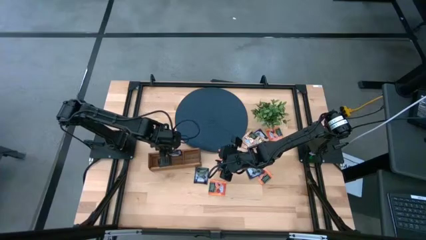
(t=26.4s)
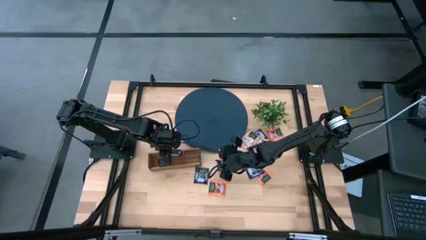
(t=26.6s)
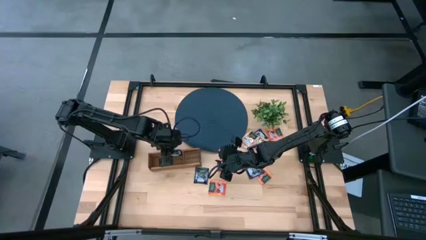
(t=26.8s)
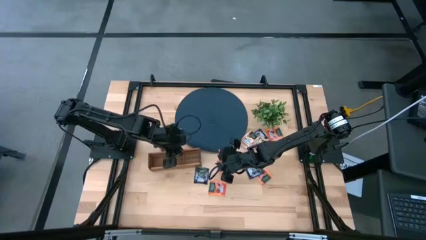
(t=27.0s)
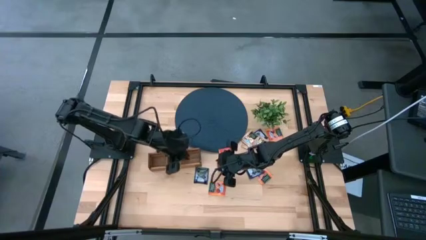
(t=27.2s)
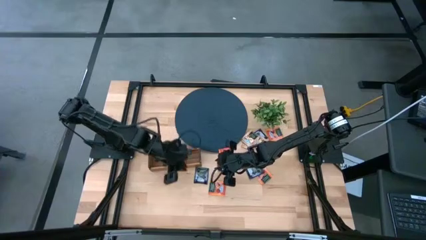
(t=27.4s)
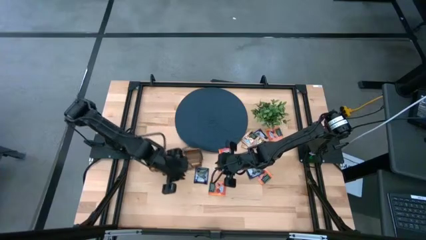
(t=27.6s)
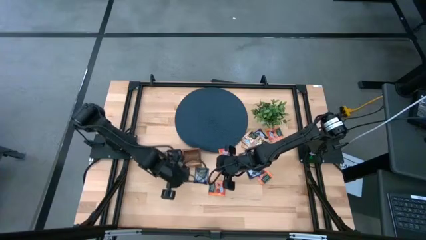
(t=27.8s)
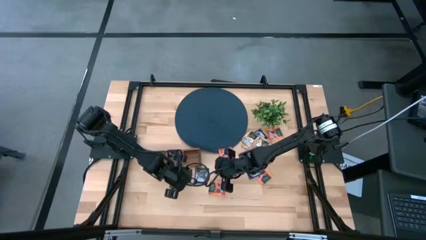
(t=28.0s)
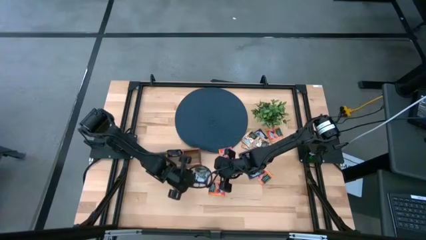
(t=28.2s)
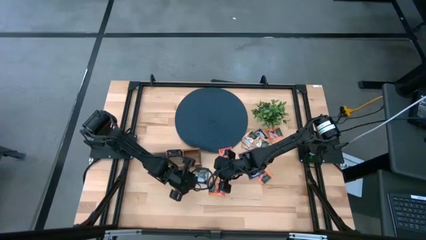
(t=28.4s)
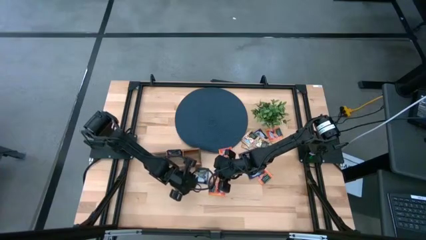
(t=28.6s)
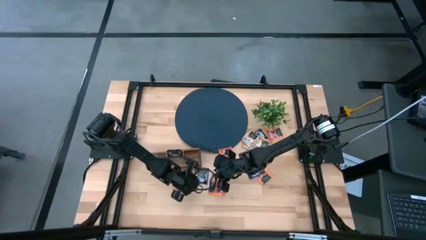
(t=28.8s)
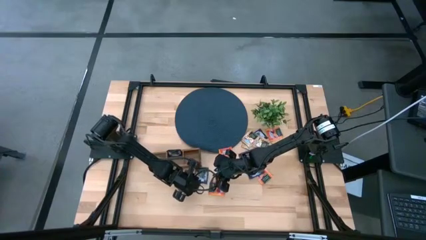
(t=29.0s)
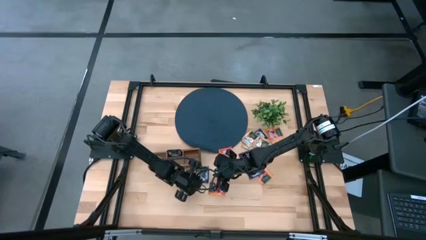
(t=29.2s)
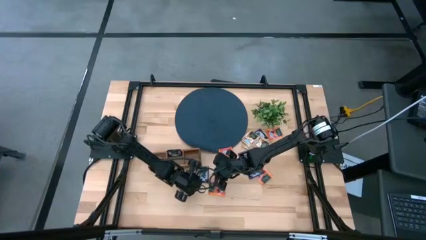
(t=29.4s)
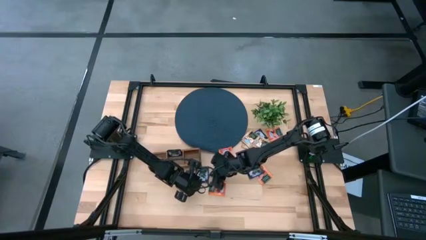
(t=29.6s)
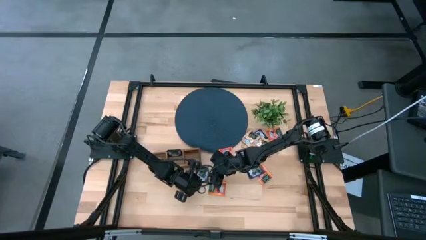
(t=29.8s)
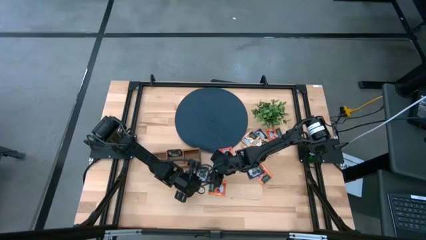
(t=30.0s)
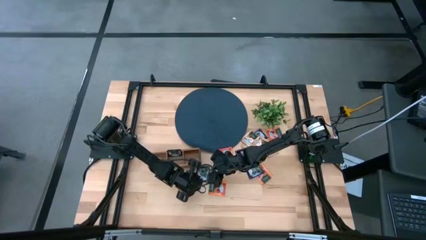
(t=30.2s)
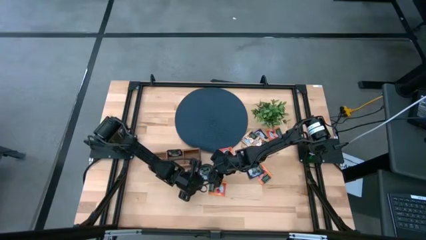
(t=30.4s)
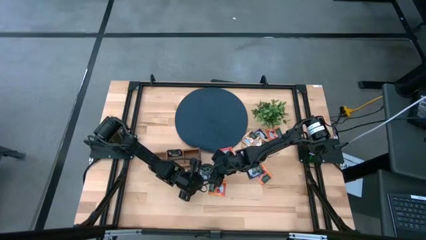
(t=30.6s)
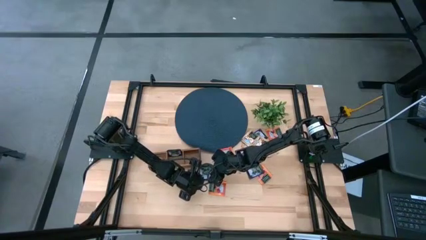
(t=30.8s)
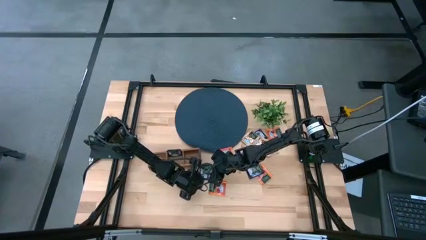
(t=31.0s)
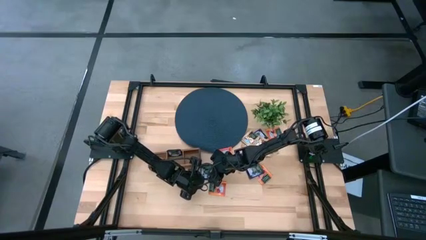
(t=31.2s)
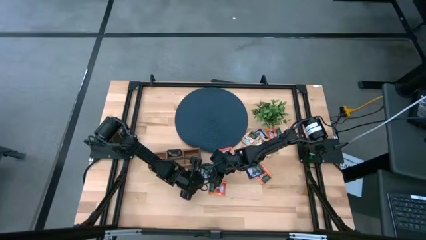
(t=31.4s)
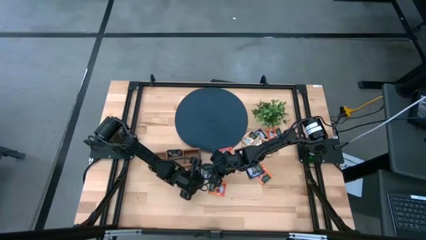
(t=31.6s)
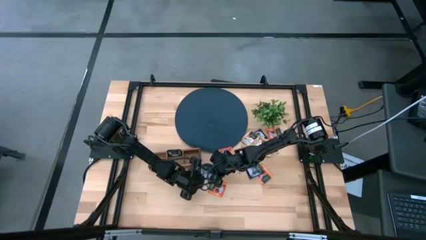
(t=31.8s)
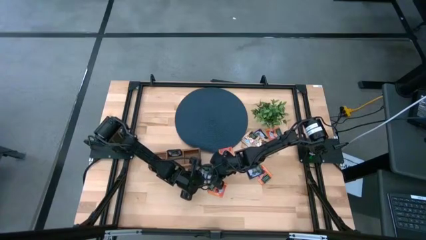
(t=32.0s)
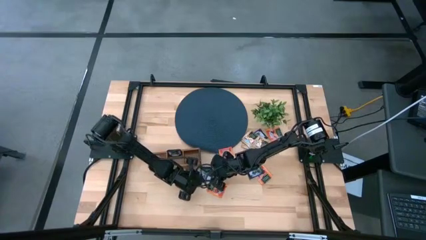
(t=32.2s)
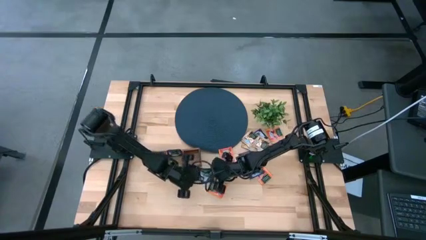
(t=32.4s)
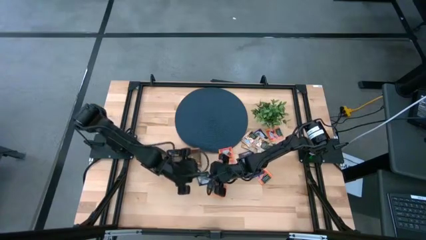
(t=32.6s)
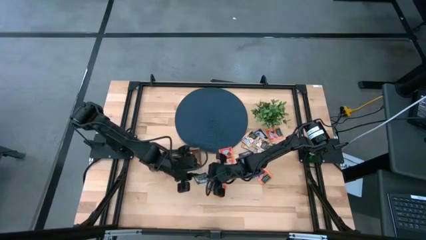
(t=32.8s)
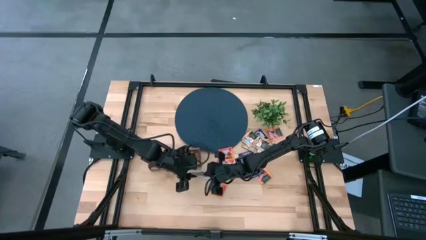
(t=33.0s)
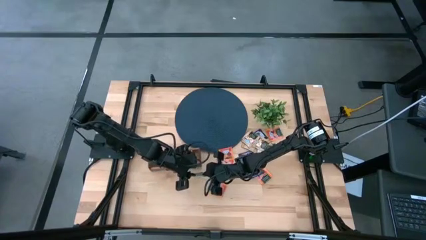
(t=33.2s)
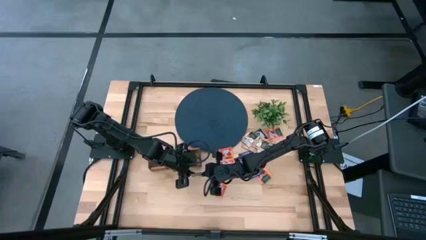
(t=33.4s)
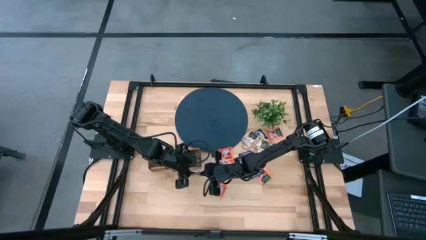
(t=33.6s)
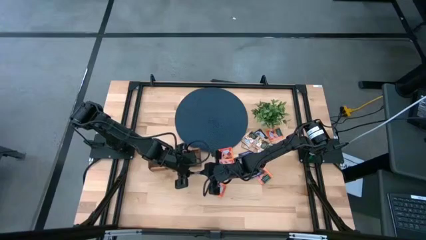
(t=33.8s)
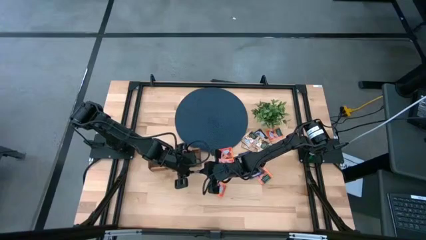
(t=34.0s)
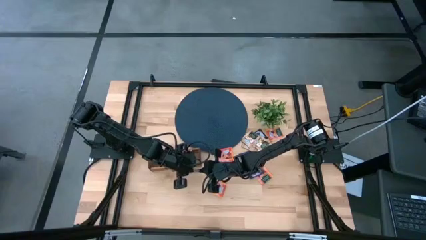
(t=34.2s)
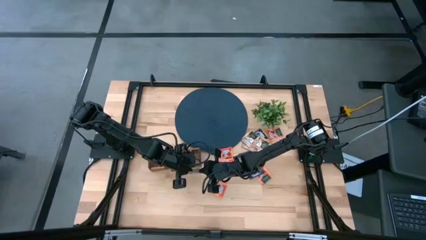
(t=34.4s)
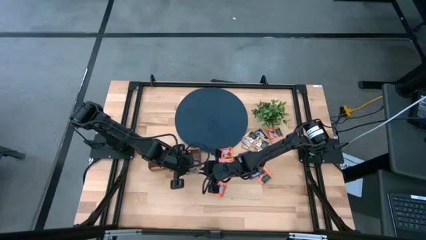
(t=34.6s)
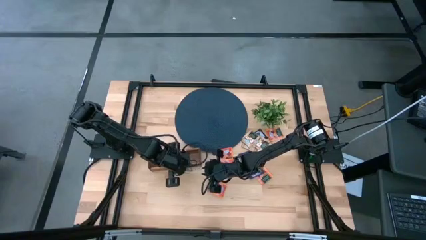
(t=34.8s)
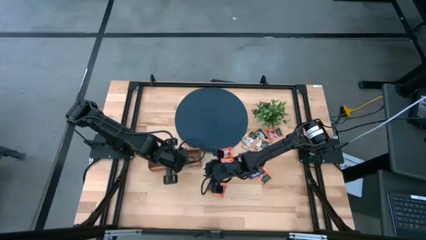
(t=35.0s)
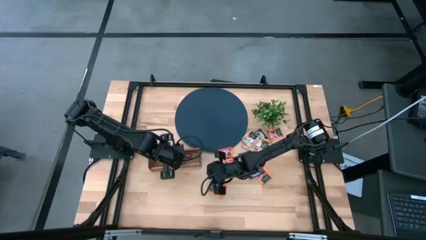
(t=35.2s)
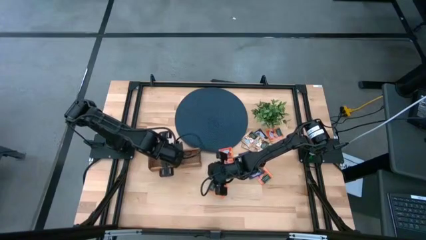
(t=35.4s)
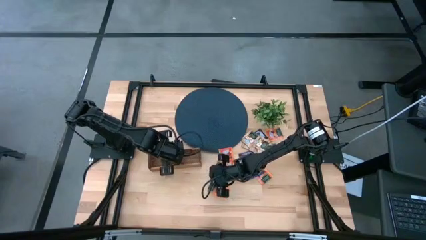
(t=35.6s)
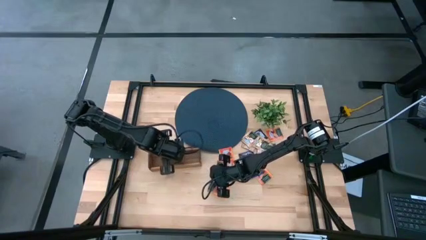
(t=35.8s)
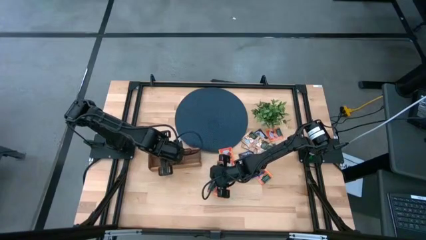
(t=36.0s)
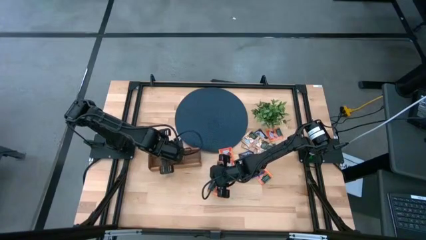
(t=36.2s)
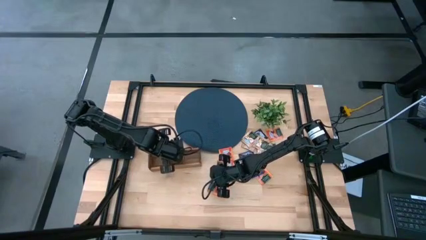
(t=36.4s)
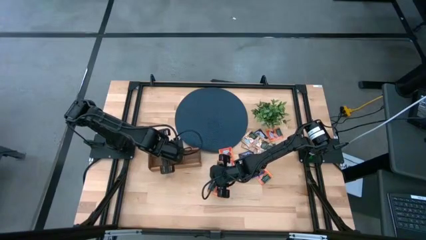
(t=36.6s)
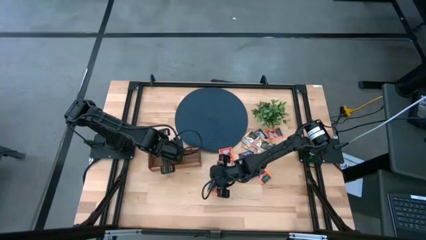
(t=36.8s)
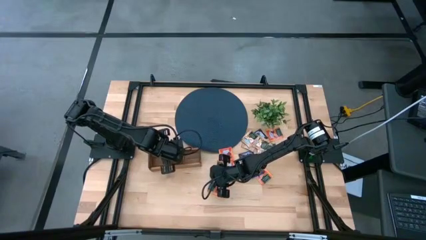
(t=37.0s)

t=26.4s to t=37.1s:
Task: Pick & Place Tea
Put the blue tea bag into the middle section of the wooden organizer
